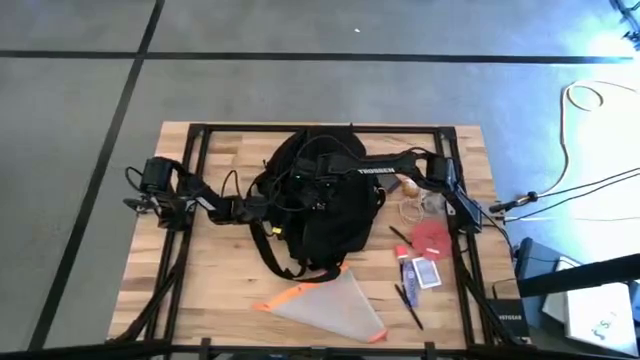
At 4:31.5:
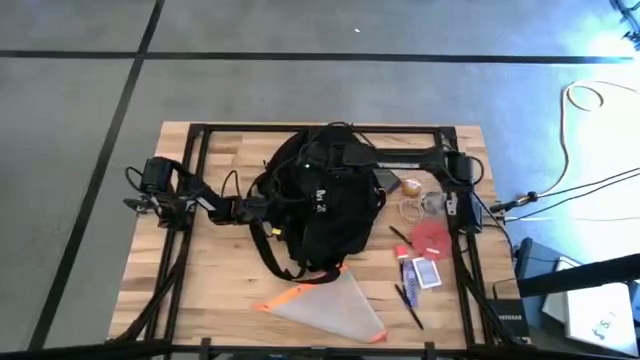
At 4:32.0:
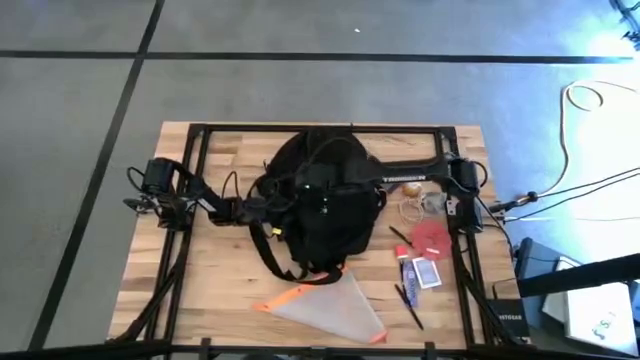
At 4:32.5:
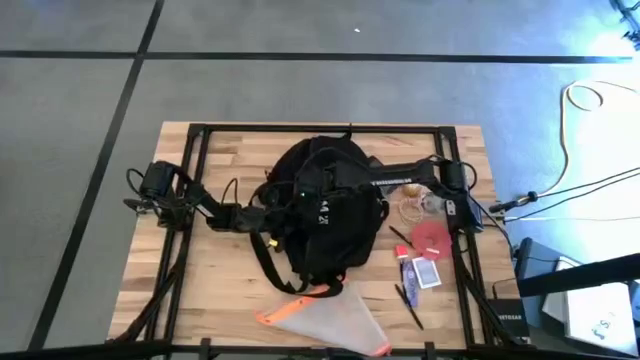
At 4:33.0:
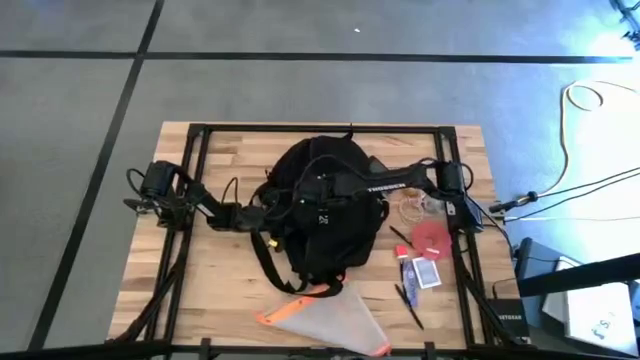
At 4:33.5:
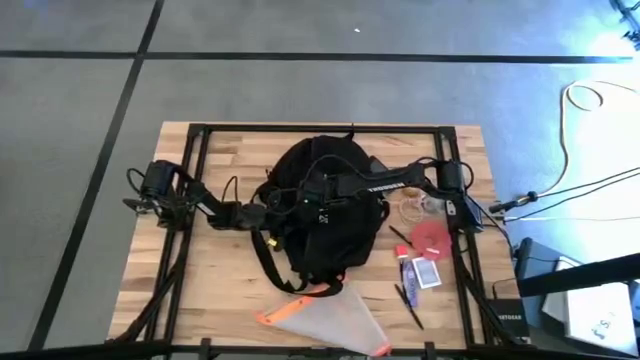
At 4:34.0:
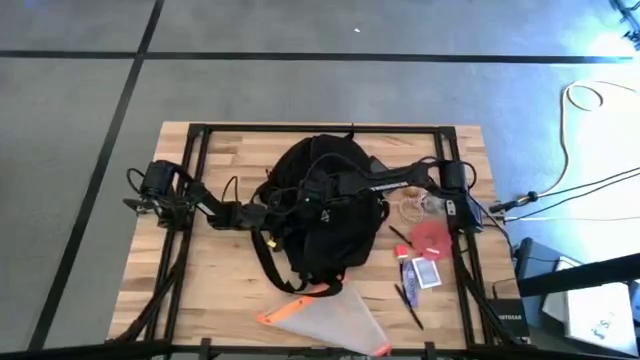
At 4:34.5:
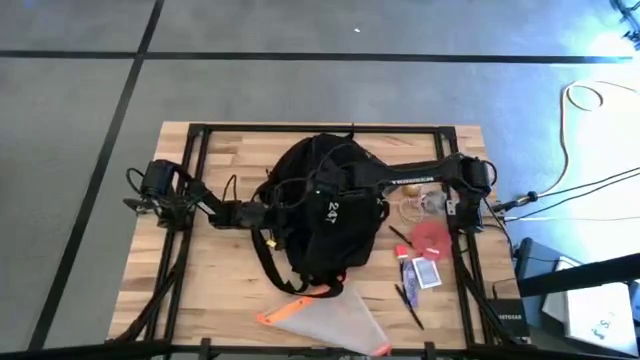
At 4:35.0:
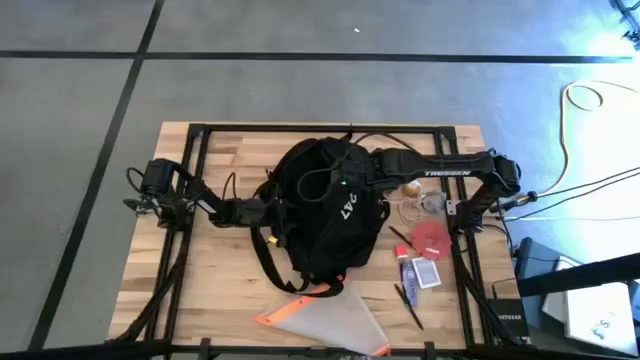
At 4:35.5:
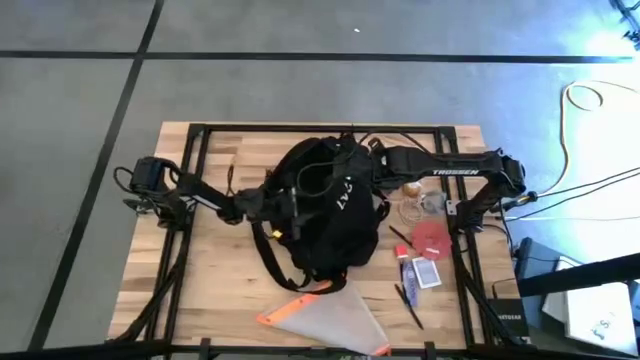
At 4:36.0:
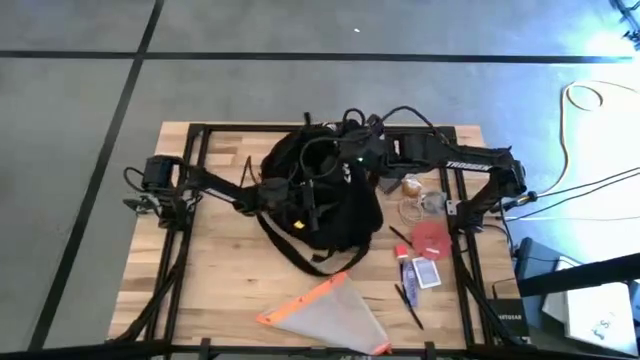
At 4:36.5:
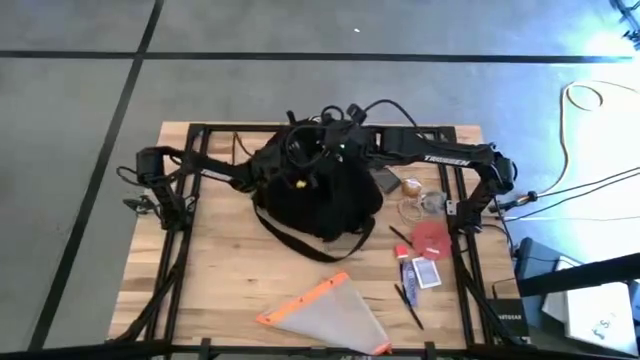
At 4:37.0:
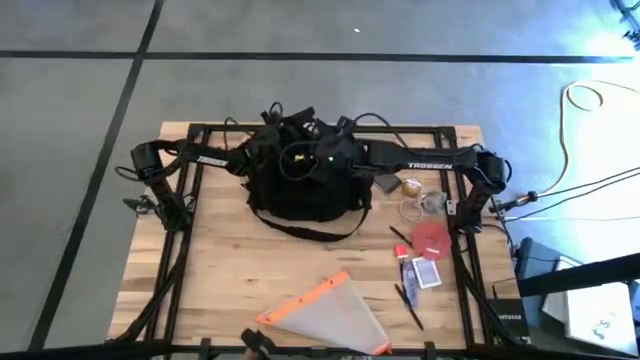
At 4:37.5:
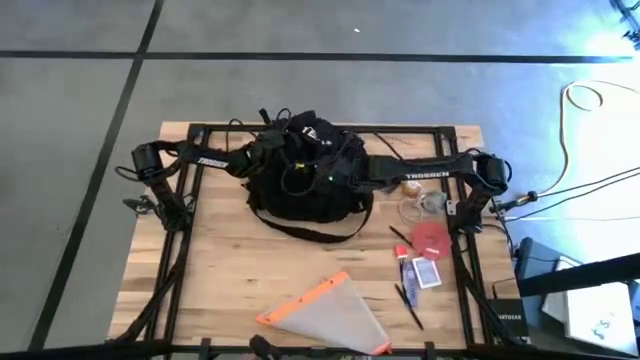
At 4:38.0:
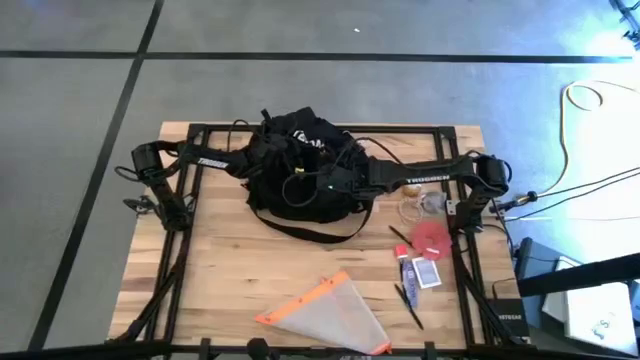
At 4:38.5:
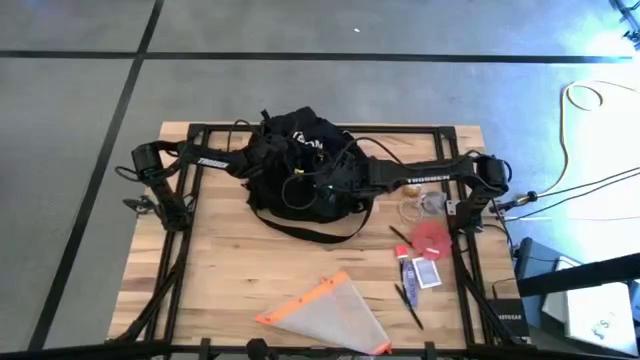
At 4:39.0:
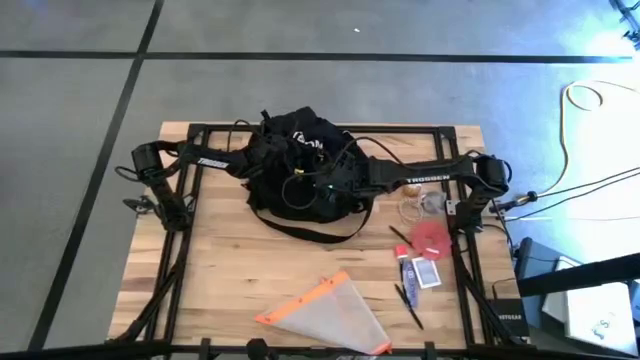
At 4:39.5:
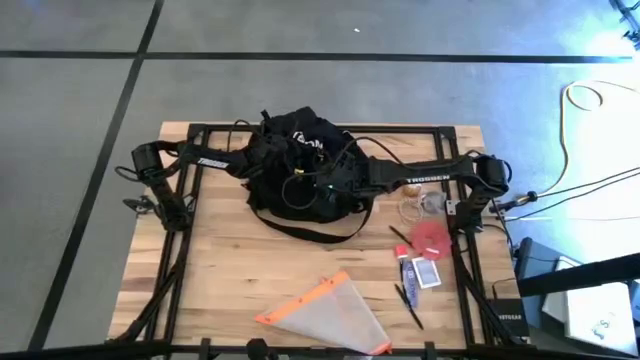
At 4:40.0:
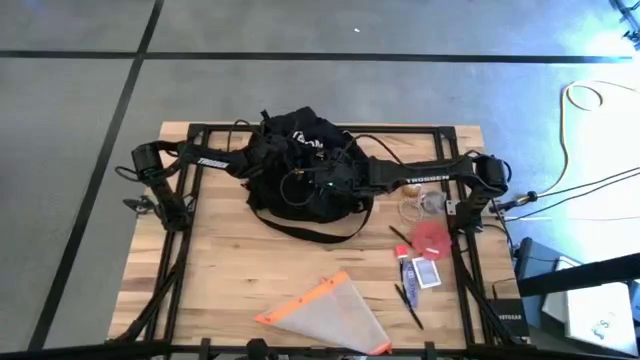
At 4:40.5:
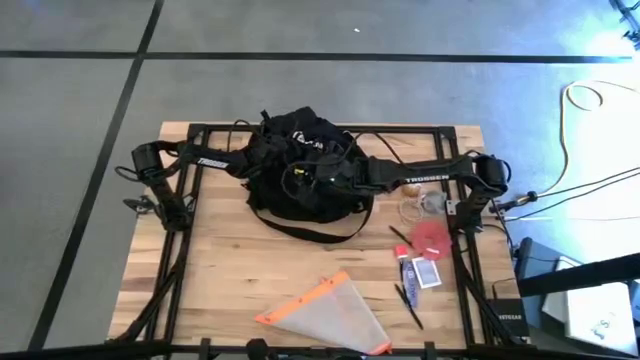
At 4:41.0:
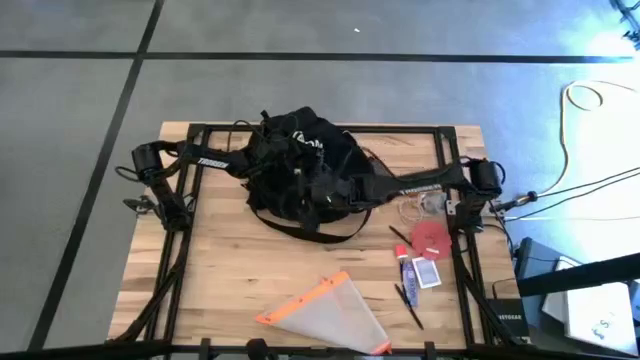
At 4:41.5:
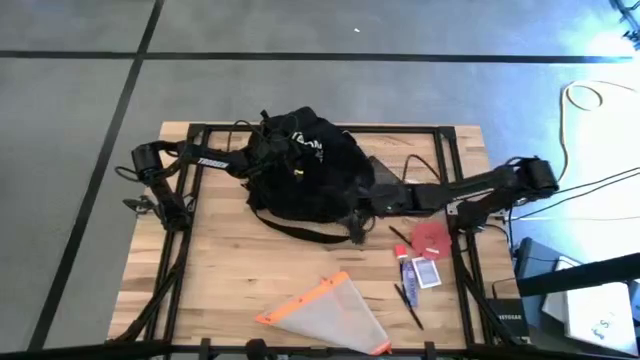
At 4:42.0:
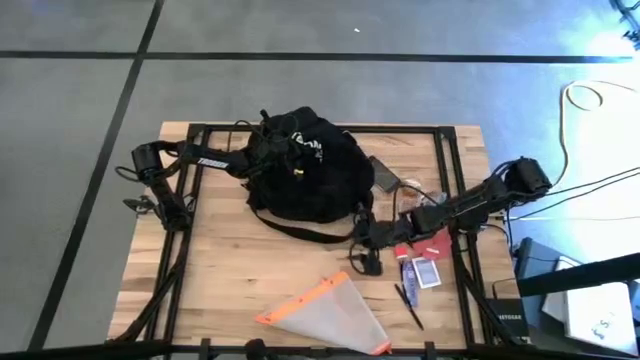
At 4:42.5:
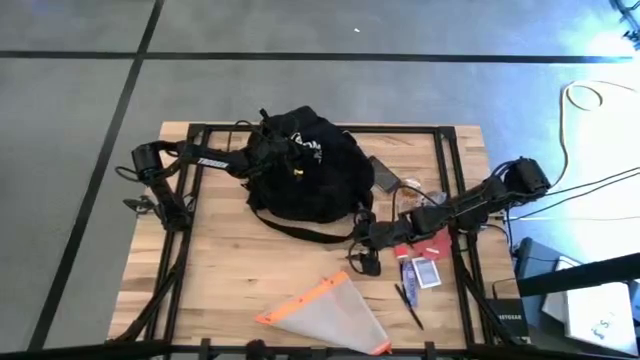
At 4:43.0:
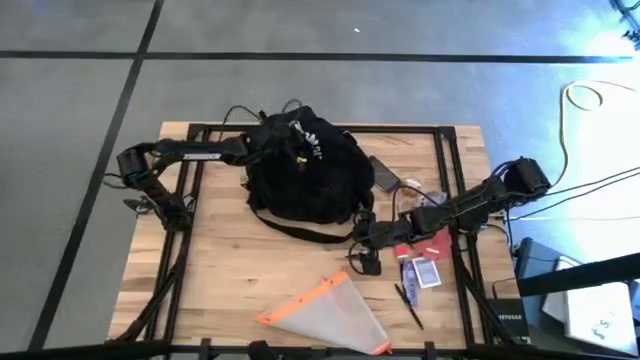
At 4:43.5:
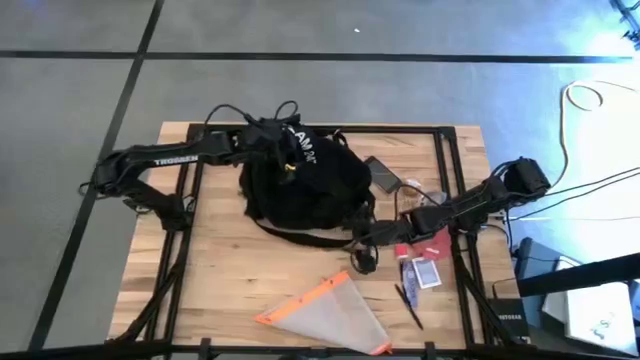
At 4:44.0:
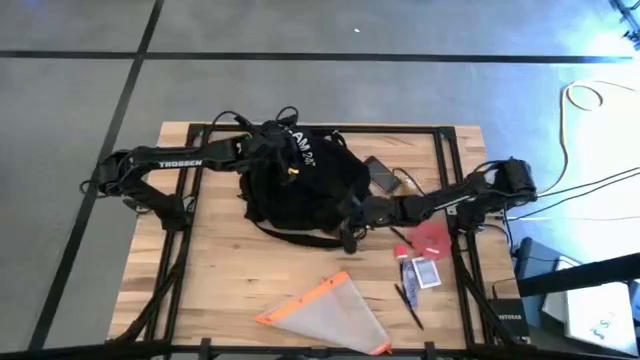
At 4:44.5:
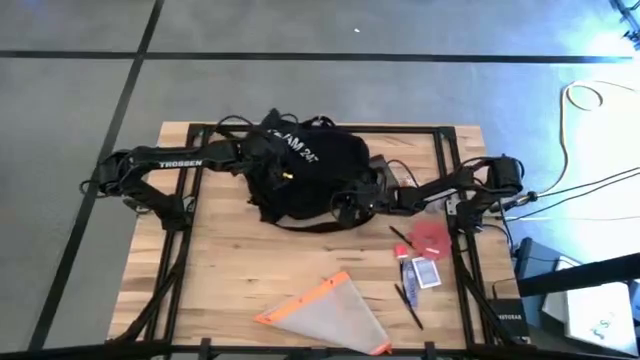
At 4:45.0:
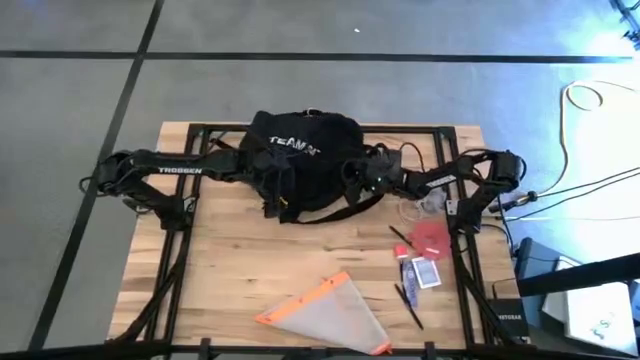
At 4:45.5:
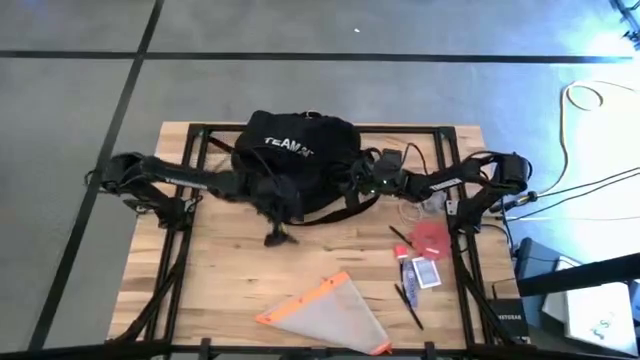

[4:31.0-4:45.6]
Task: Unpack backpack
Move the black bag to the center of the table
